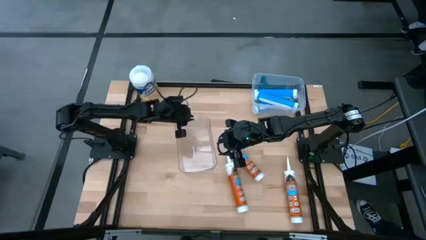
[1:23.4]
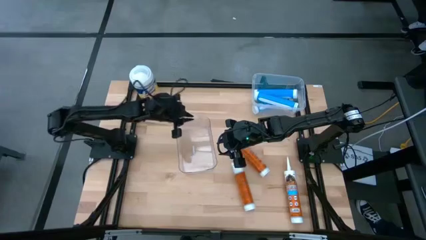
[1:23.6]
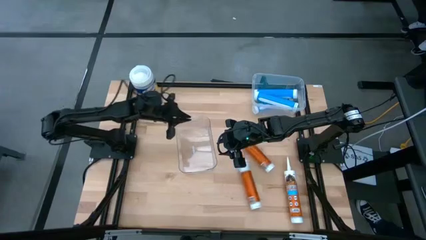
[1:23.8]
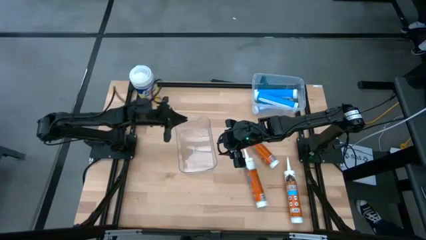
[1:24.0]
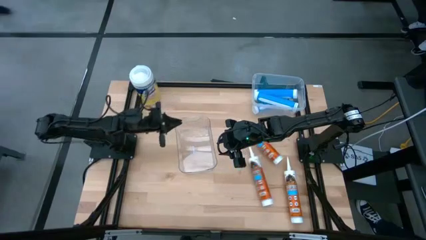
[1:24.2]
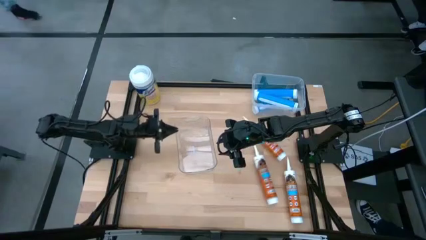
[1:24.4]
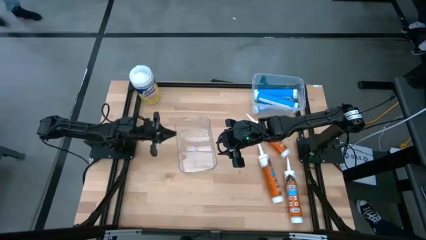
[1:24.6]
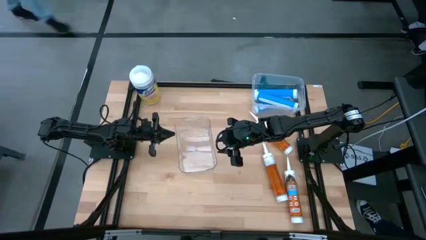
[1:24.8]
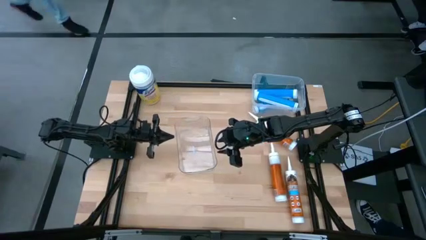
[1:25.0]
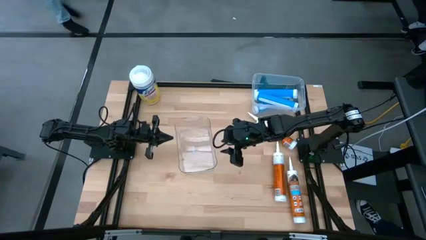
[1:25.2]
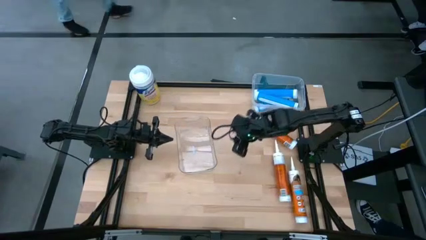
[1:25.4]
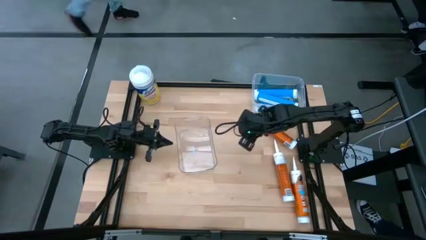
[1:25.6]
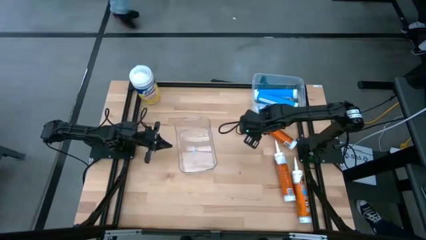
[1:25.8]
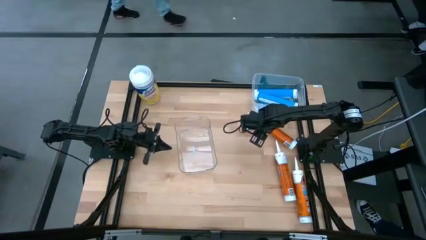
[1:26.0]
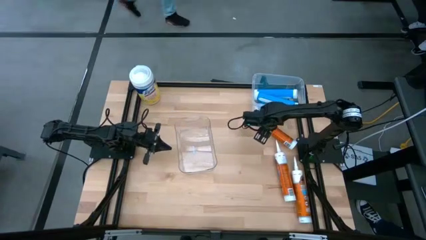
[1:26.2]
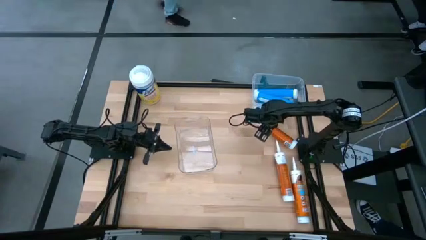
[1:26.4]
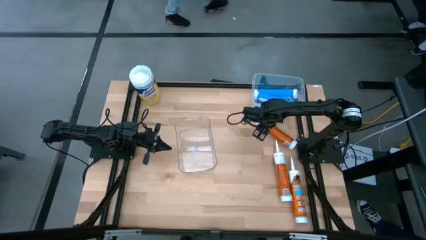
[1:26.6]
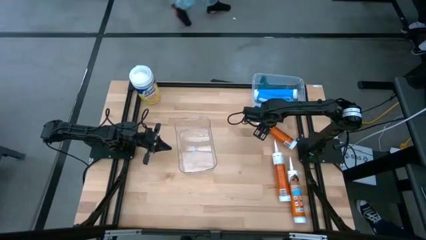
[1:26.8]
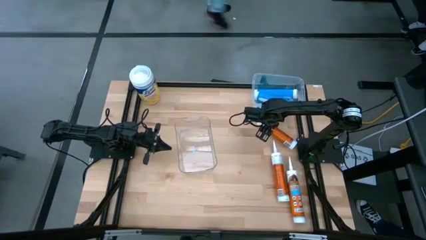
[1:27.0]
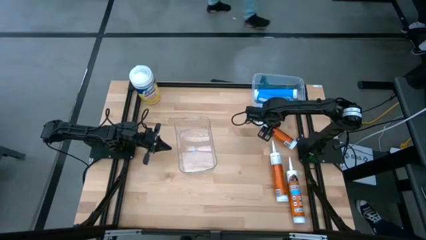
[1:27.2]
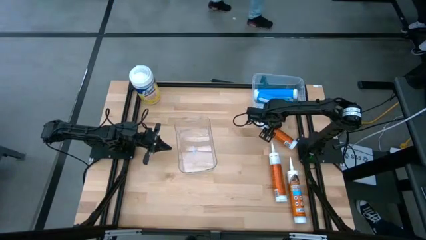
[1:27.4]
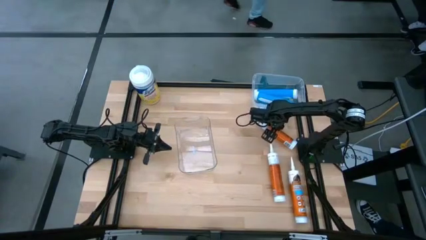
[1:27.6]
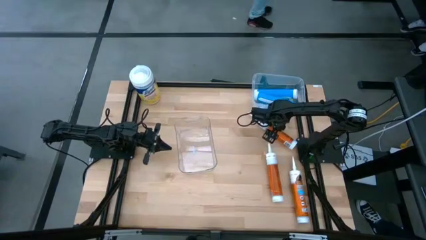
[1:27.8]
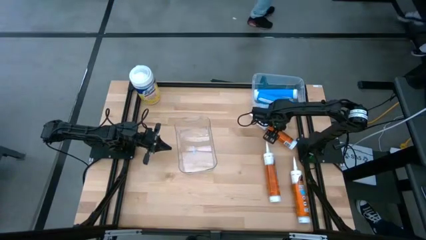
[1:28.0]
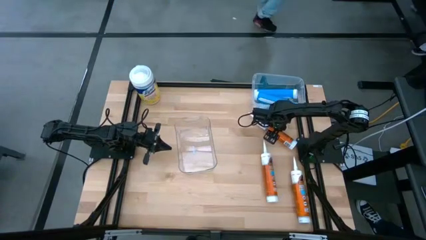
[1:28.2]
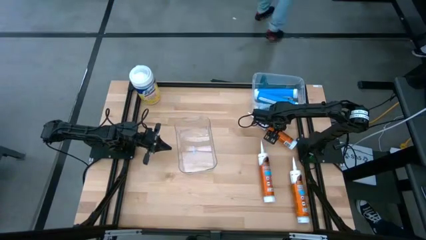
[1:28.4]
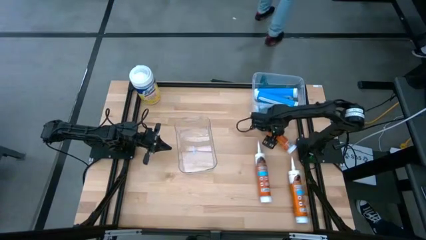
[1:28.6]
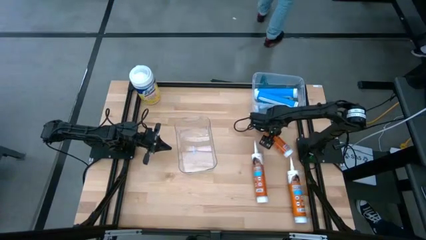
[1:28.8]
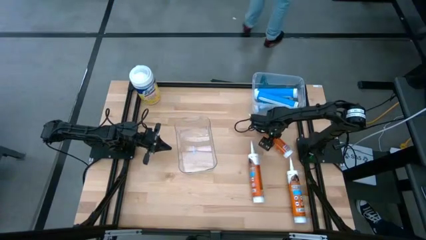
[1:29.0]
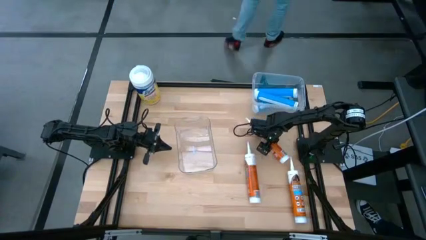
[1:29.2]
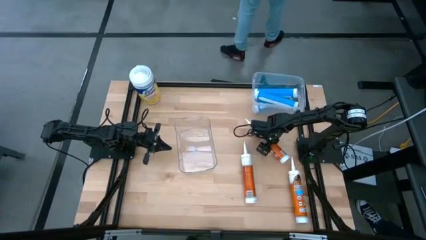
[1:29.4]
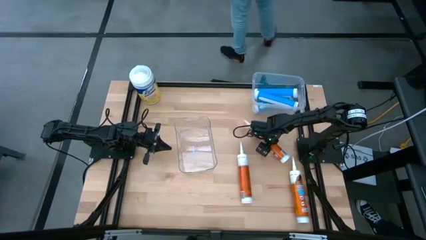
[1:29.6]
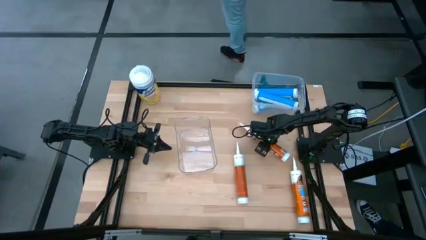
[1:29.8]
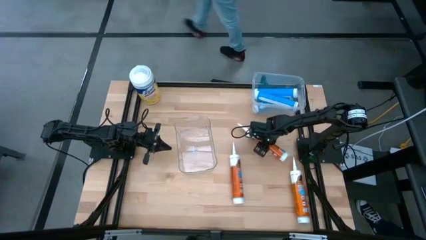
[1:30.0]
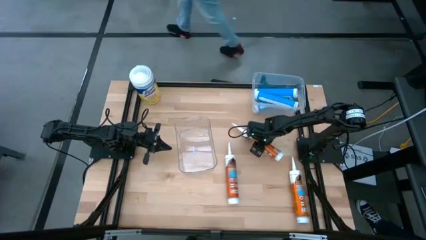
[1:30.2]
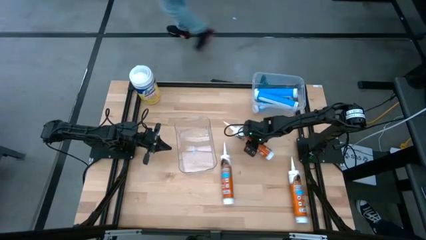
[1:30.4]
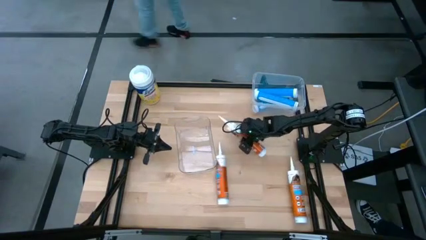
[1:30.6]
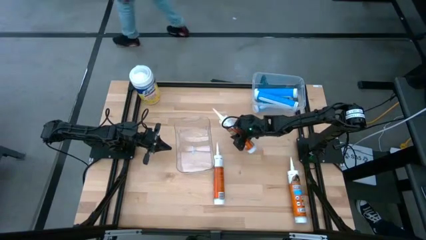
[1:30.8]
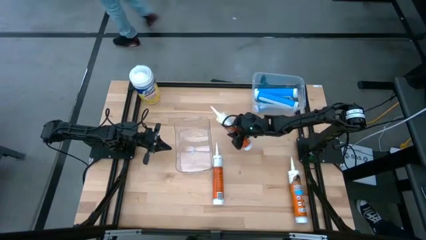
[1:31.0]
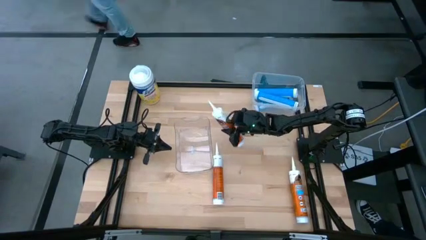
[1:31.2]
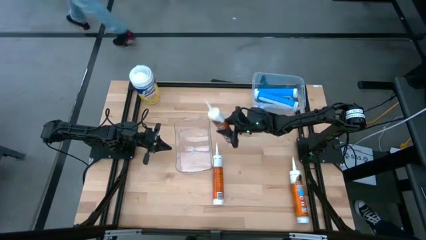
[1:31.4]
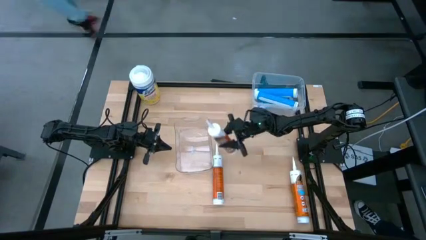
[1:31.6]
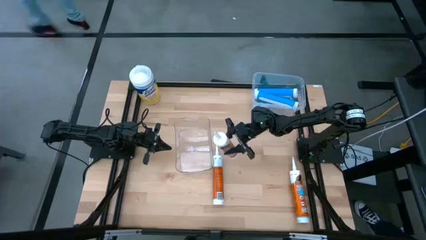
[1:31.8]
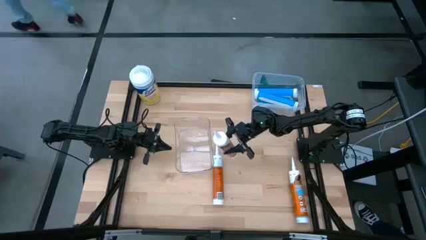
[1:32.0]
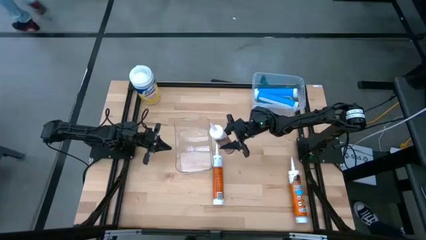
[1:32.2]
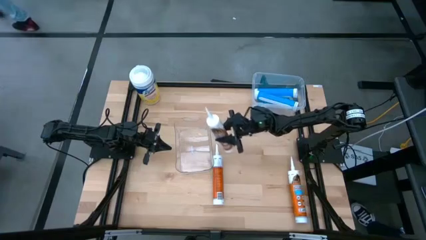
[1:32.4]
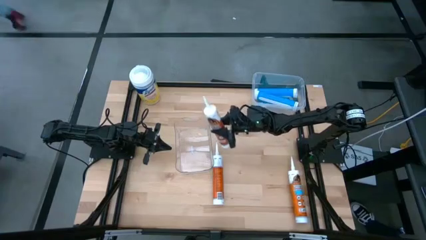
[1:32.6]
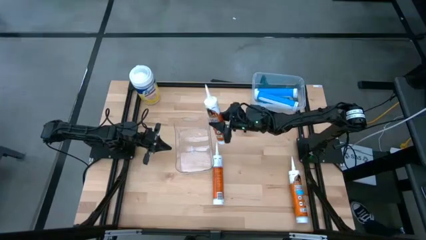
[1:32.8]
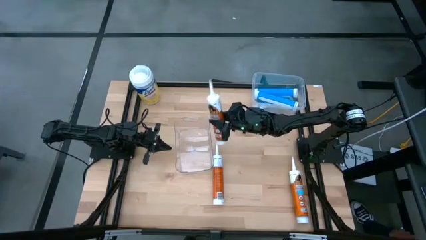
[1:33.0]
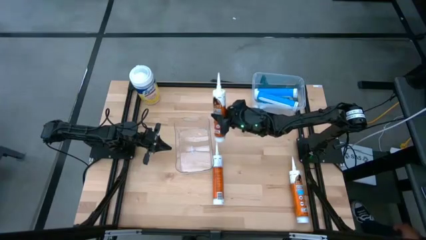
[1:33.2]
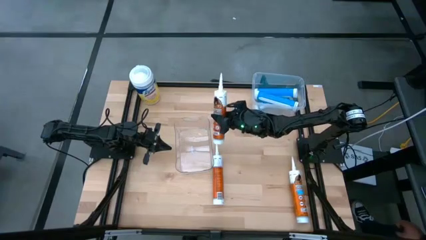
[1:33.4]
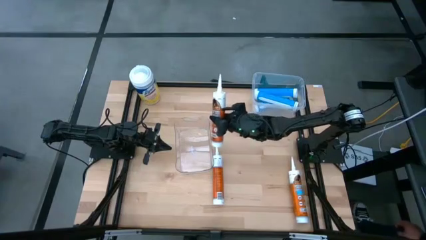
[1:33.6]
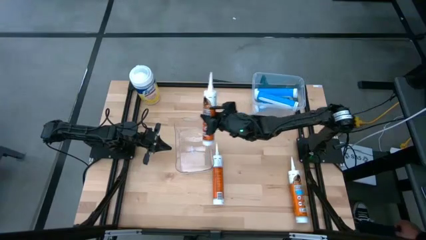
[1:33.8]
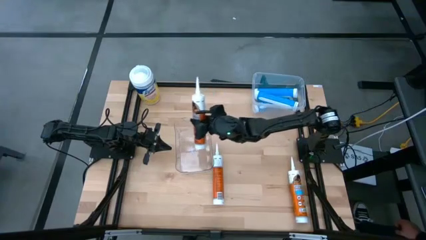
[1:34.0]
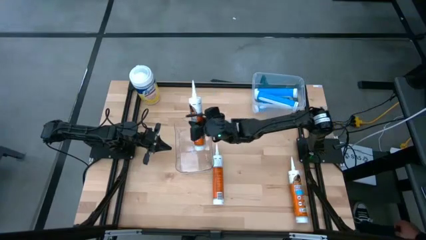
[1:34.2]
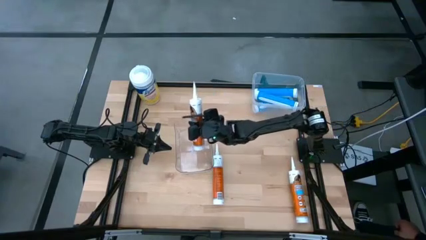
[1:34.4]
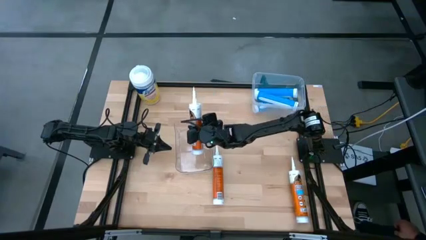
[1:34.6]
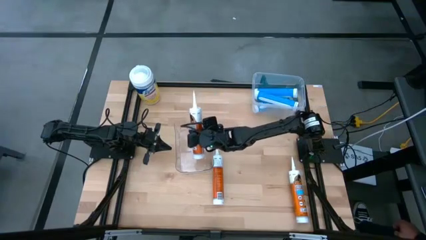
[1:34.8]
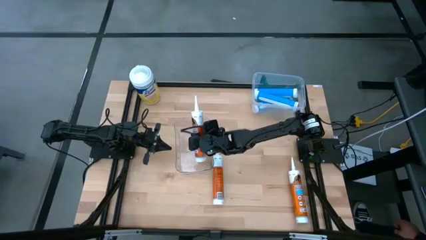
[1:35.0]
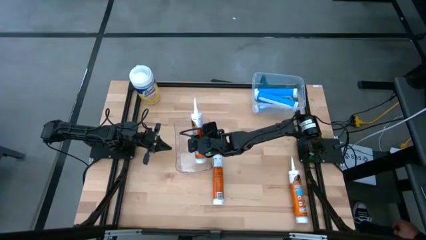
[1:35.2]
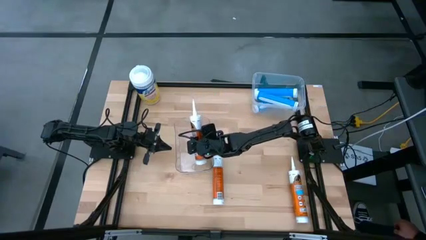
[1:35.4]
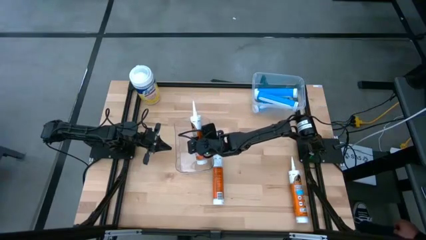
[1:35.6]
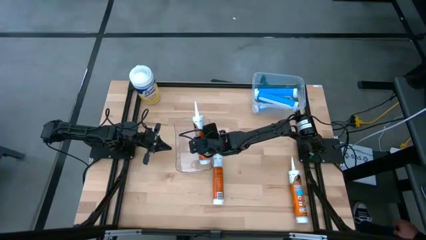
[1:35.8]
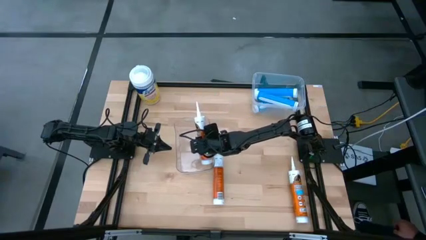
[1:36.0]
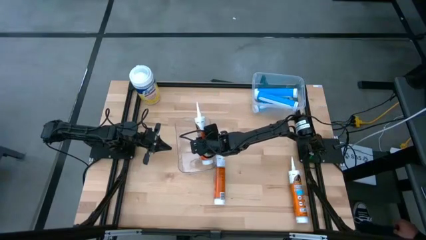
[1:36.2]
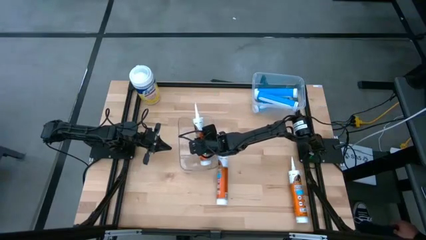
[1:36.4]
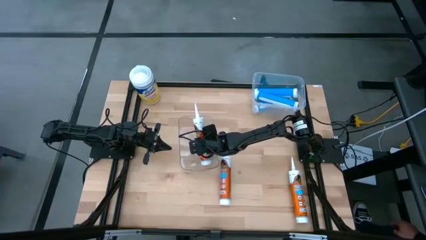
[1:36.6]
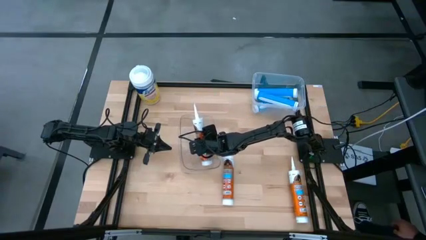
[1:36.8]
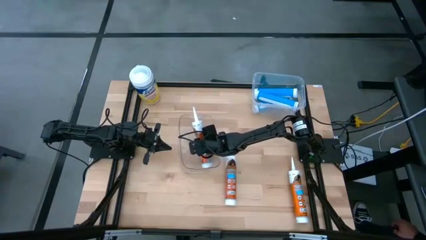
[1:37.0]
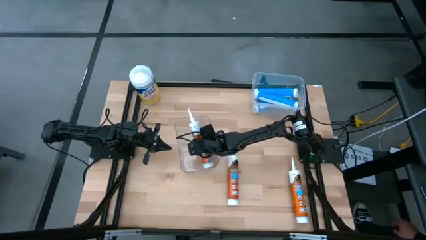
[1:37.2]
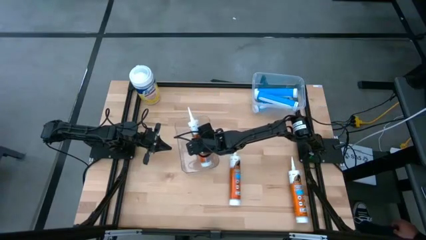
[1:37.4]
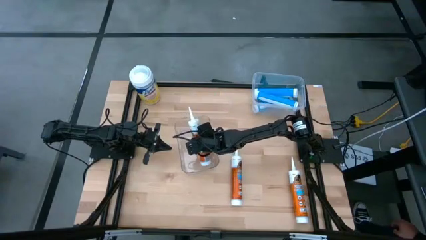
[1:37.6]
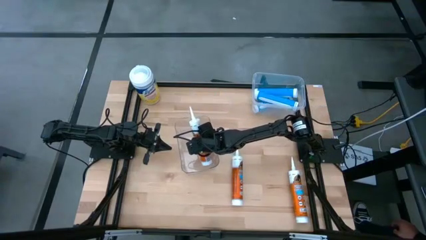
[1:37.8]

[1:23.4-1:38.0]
Task: Pick & place silicon tubes, Sealant and Lysol wipes
Put the top orange sealant into the transparent bin
